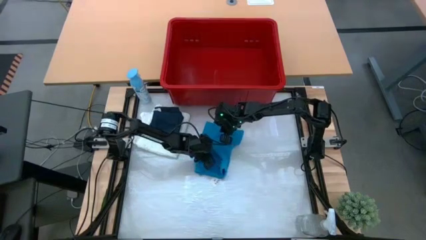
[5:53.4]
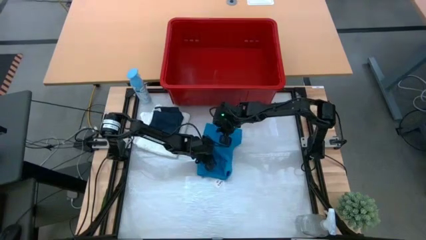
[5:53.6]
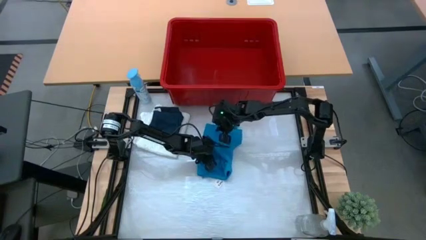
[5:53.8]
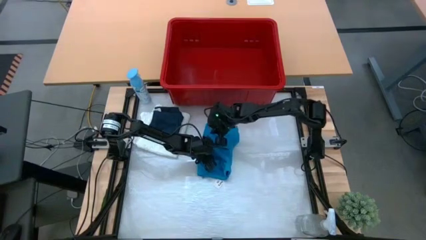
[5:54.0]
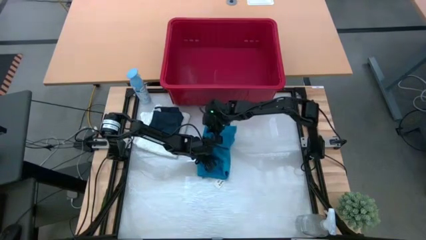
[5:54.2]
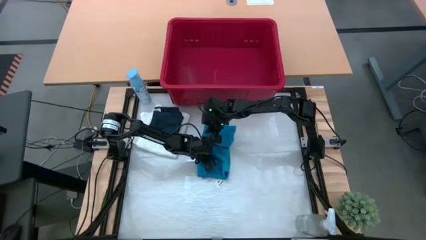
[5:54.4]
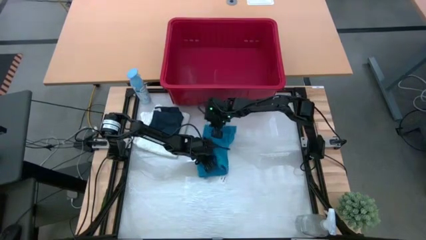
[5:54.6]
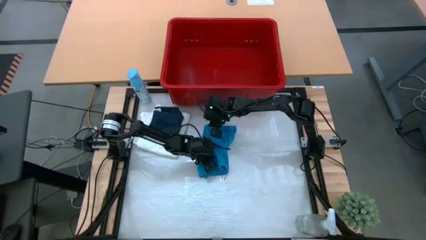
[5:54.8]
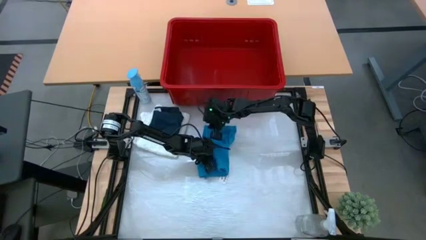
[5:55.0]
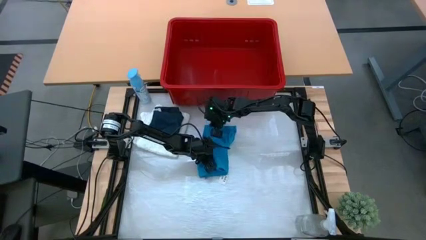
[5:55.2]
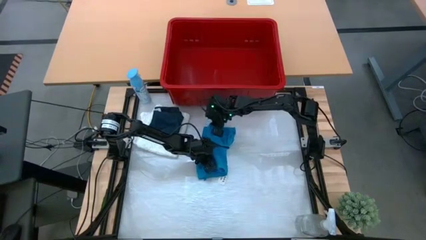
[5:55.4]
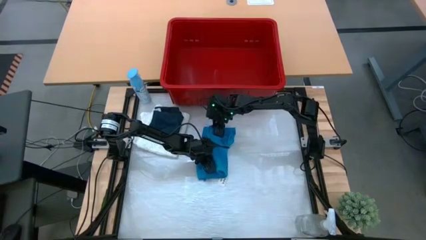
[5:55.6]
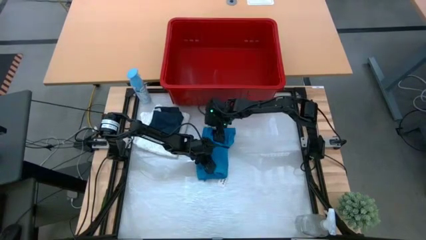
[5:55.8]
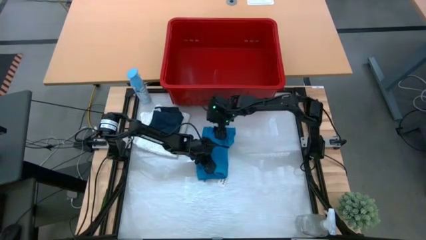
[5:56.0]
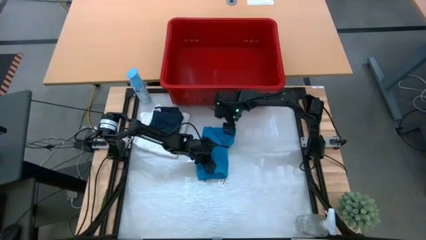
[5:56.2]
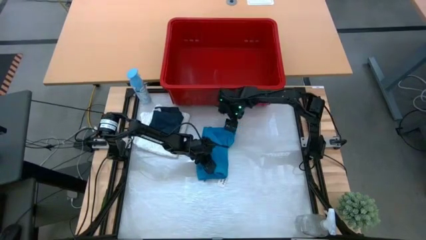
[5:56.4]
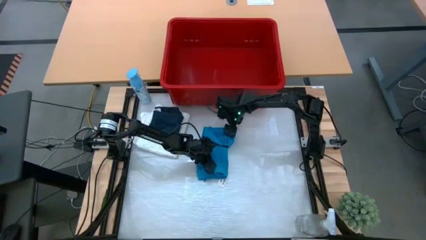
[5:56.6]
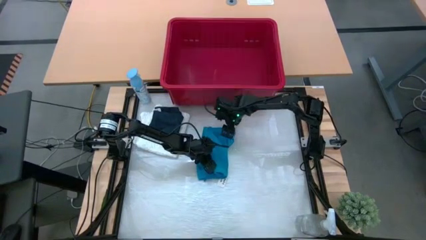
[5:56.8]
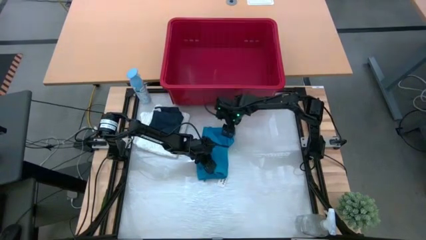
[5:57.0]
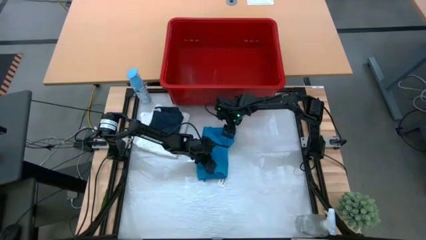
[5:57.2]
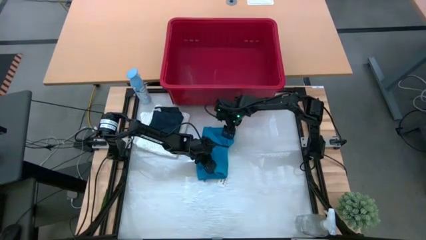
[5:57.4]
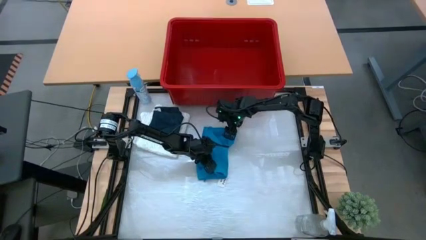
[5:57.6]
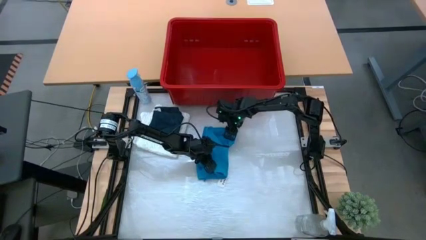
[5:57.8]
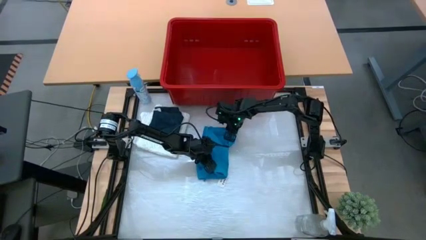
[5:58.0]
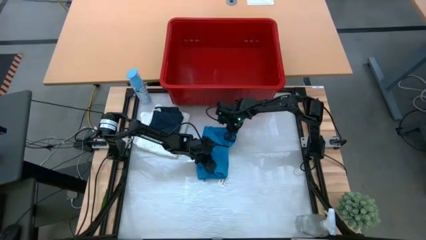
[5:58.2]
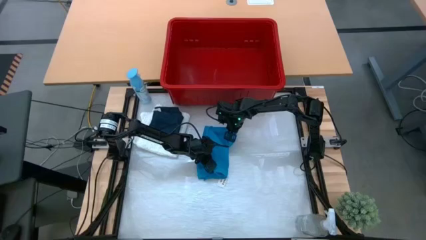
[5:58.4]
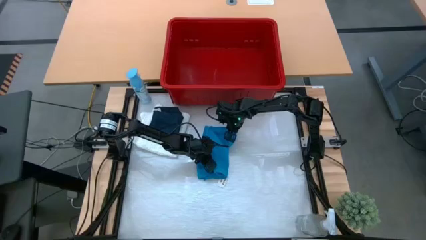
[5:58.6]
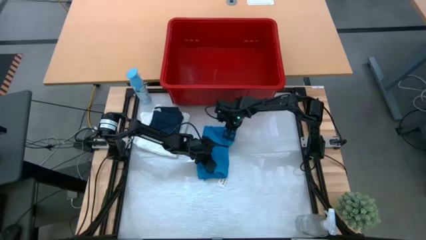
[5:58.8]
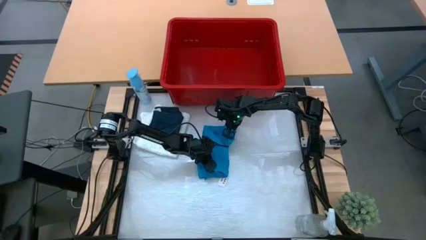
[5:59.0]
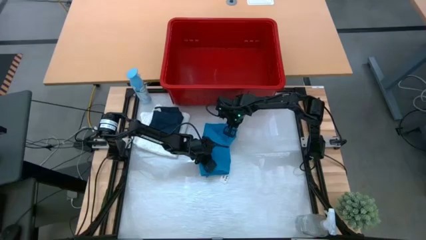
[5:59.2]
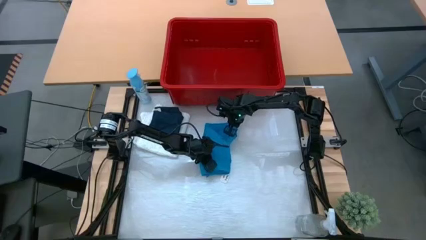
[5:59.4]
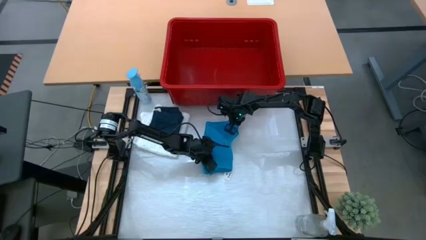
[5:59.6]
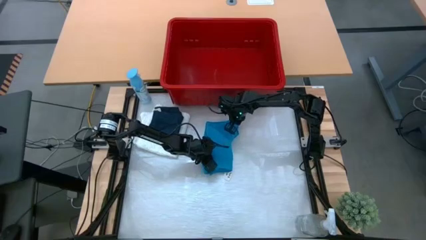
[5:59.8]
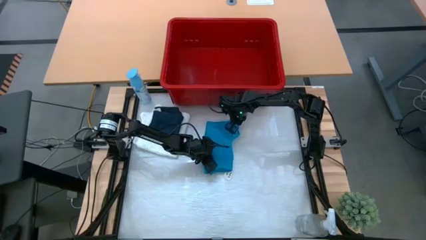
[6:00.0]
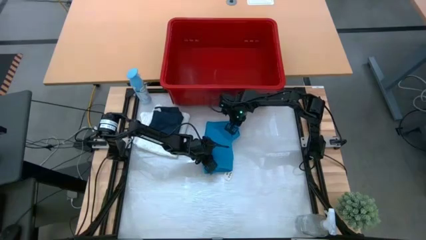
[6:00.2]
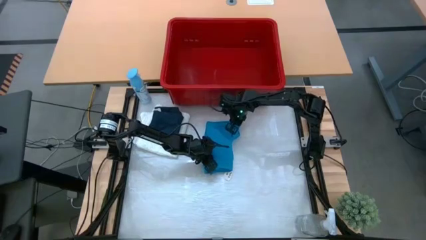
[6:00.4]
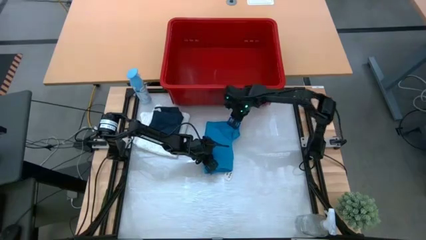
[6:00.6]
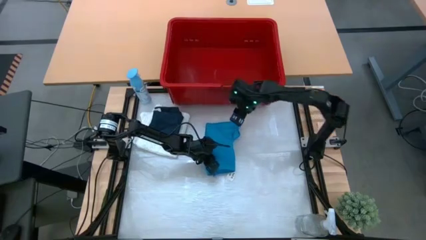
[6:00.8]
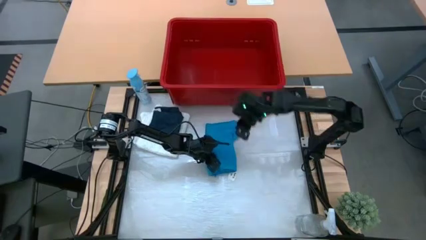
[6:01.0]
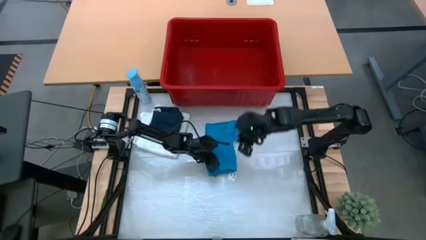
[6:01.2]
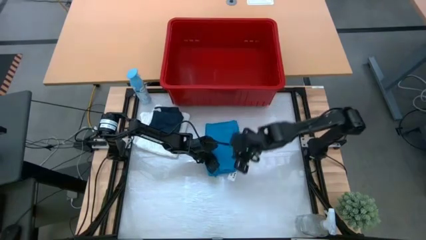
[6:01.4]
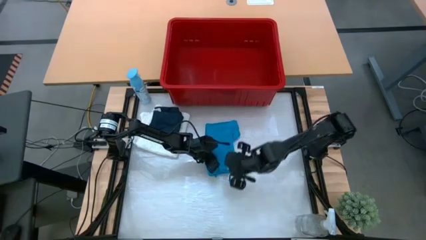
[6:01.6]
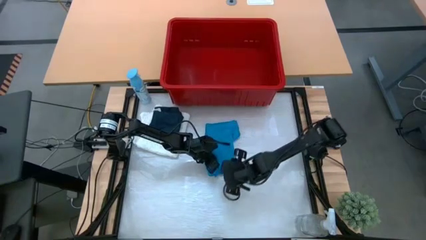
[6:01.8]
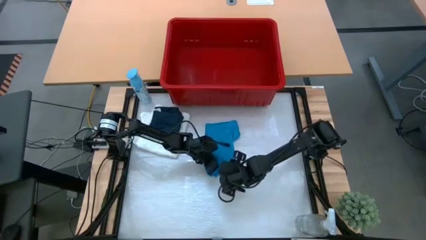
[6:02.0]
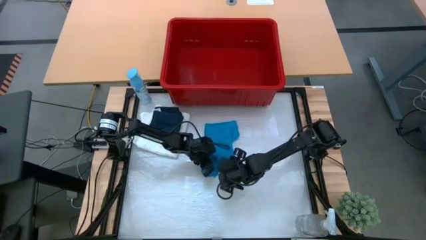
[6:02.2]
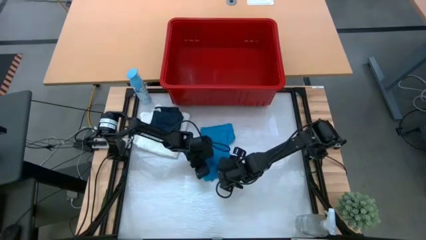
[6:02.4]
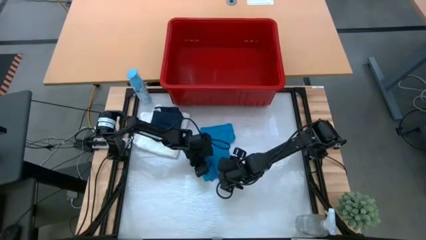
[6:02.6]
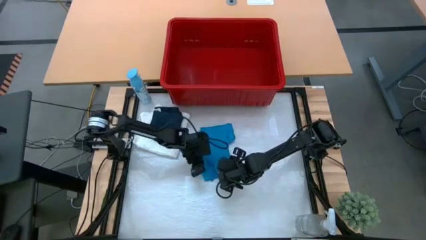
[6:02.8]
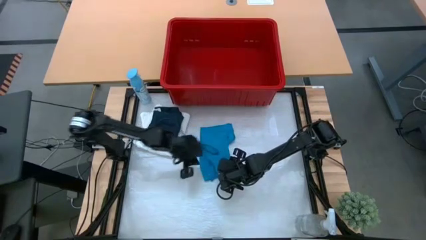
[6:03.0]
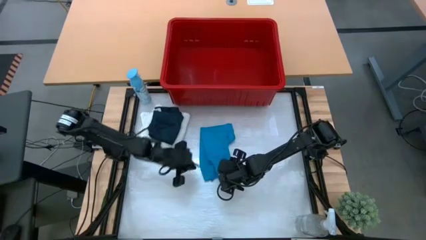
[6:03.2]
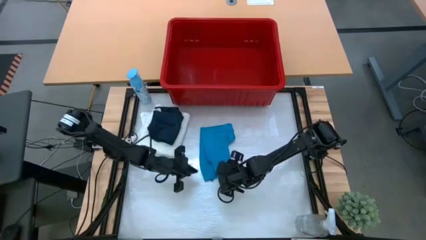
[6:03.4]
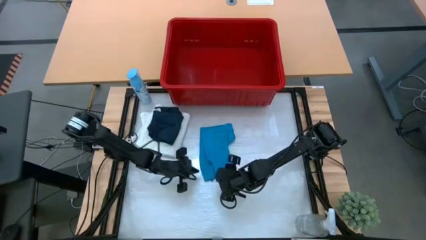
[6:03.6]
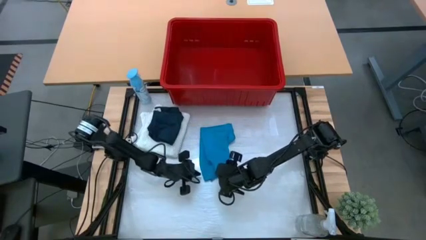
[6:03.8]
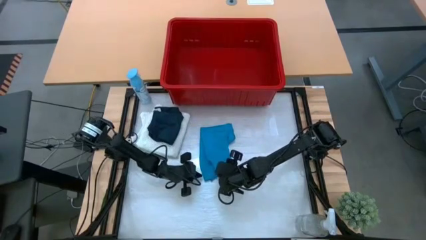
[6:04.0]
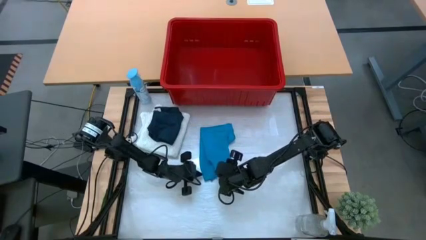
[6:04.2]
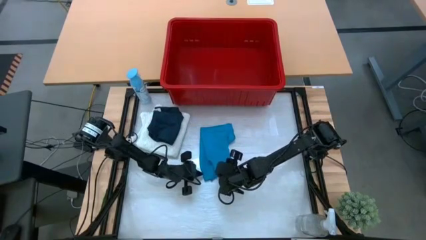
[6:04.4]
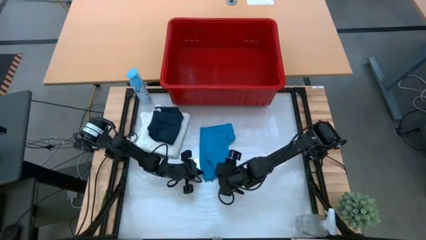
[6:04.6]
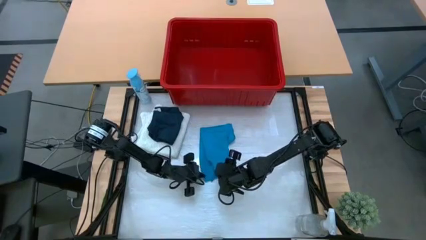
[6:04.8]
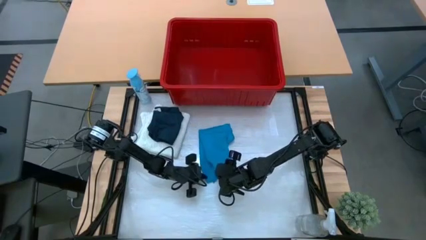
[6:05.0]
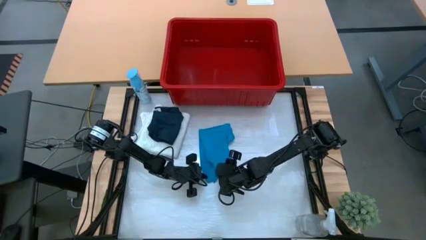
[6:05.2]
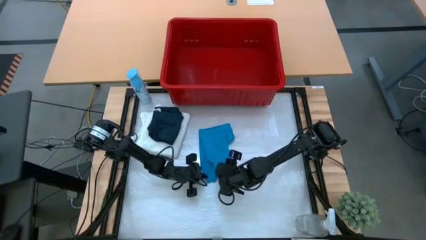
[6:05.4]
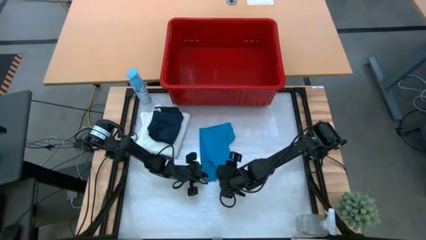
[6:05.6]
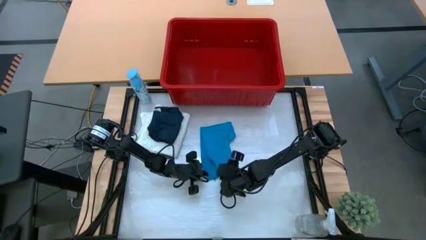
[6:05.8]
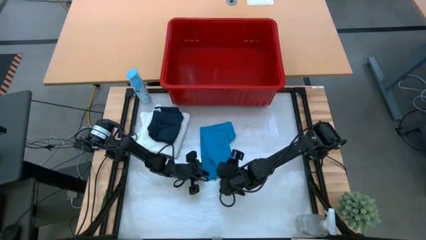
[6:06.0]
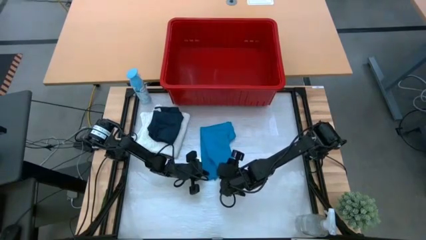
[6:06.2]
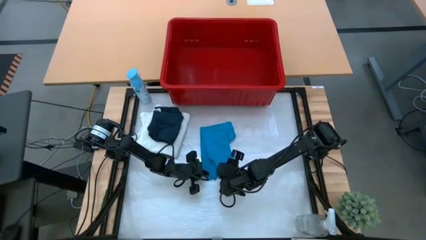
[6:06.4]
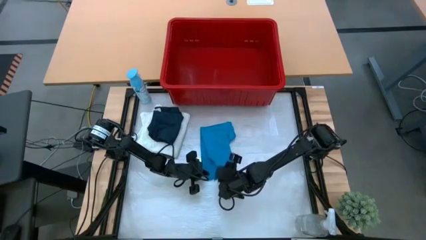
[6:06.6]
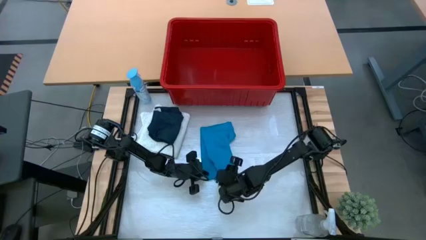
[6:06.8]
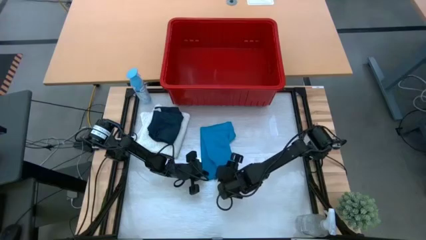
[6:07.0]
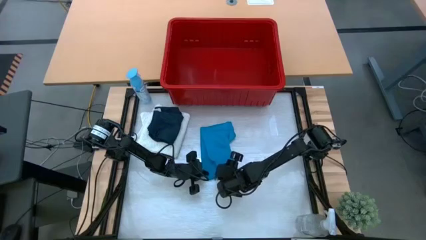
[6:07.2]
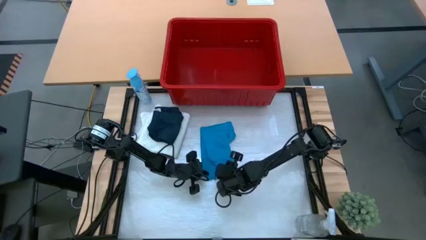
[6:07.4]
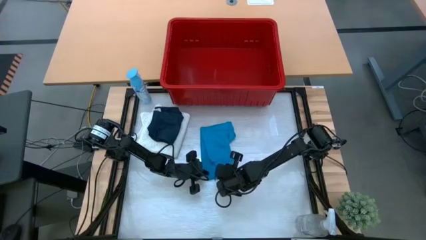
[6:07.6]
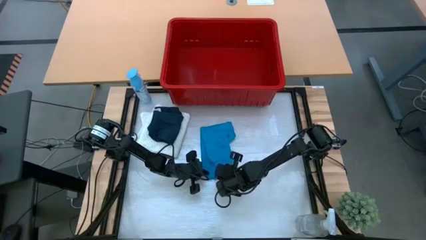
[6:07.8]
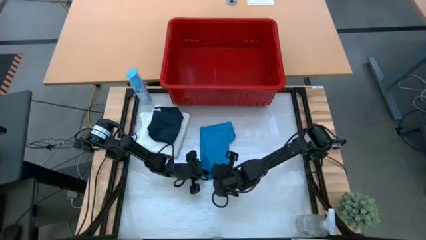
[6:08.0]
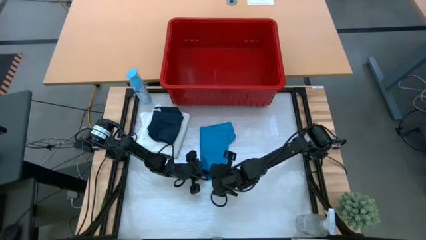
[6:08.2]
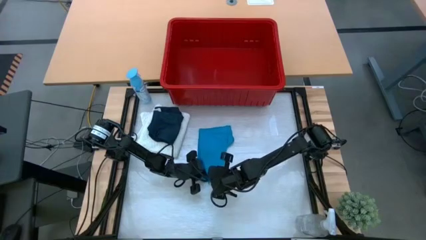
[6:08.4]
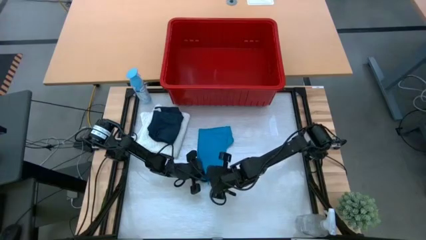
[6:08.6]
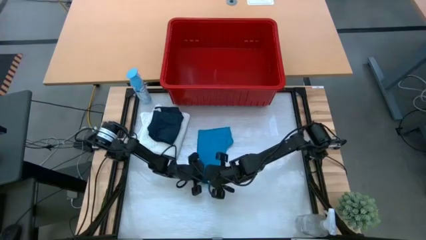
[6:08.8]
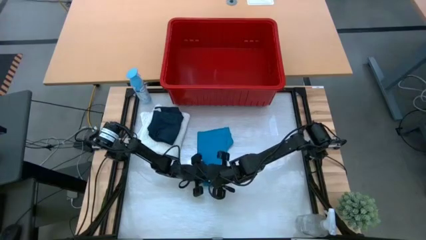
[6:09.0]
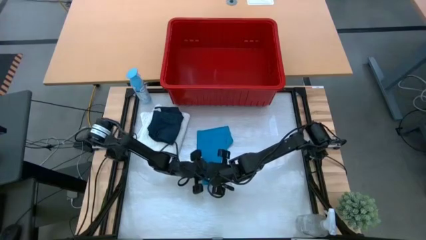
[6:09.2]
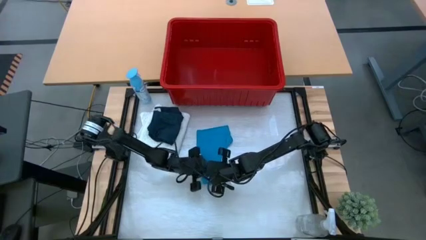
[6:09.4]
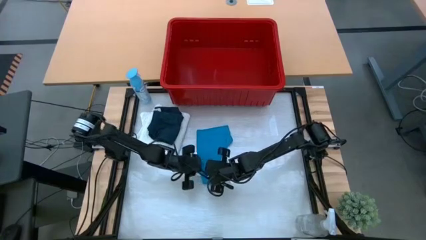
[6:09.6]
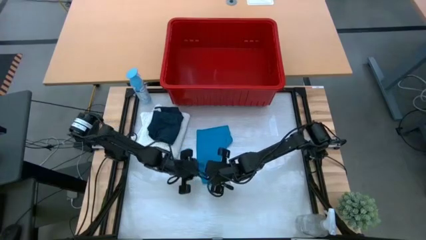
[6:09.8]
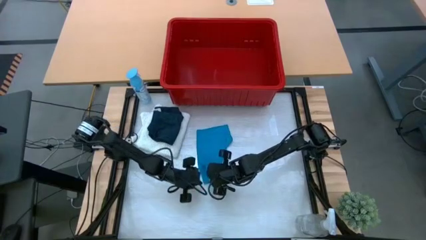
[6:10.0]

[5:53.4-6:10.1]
Task: Fold Laundry from Bin
Fold the blue shorts
